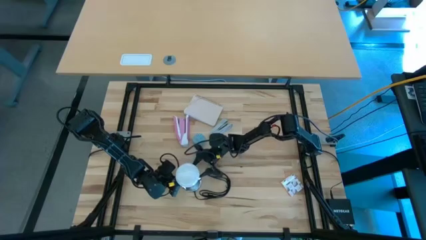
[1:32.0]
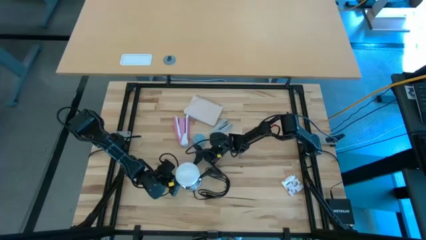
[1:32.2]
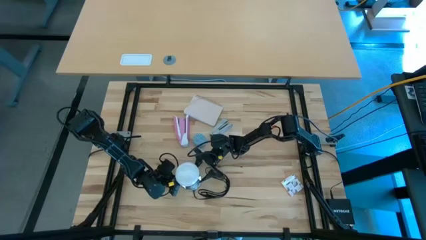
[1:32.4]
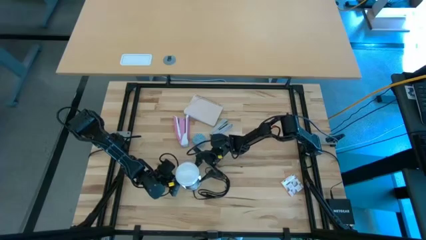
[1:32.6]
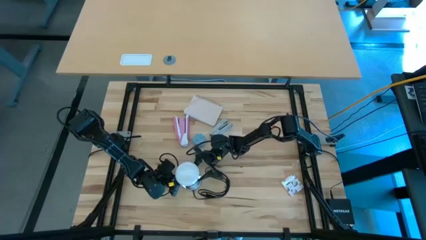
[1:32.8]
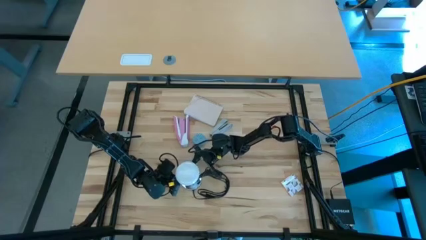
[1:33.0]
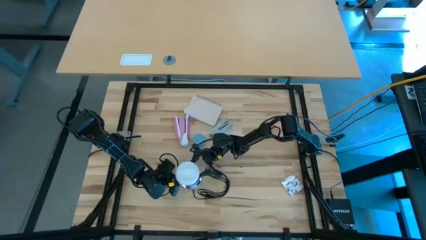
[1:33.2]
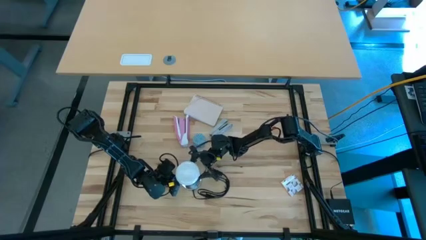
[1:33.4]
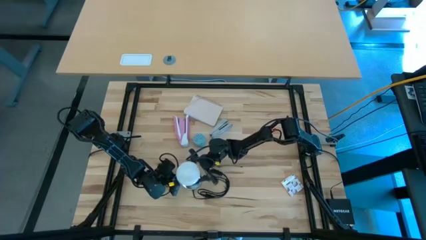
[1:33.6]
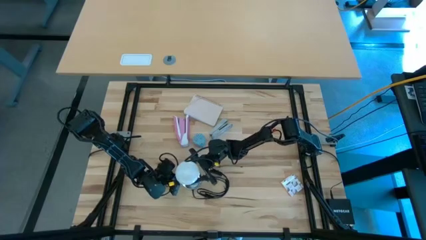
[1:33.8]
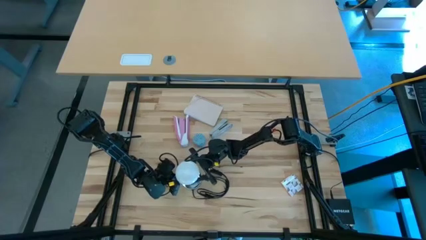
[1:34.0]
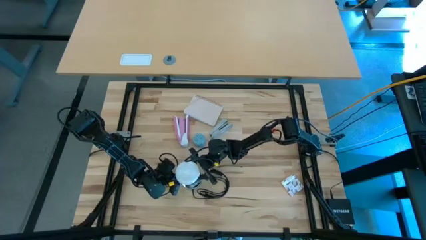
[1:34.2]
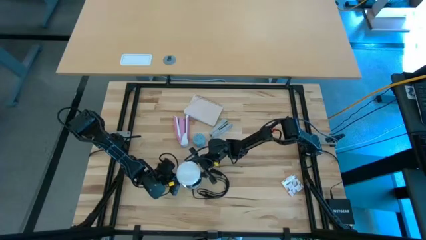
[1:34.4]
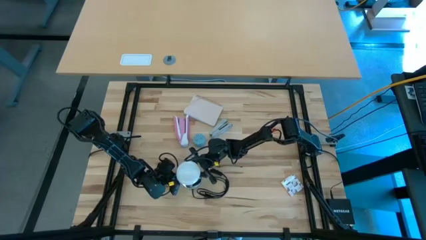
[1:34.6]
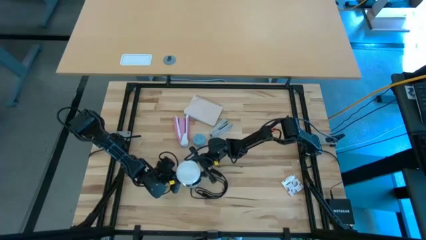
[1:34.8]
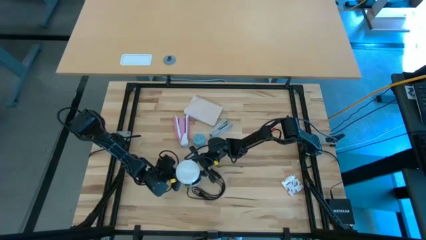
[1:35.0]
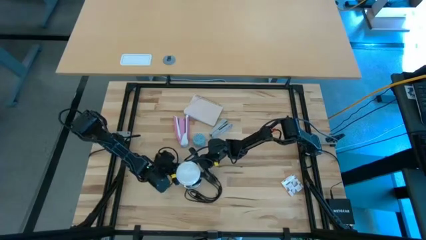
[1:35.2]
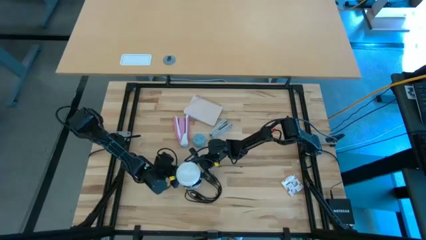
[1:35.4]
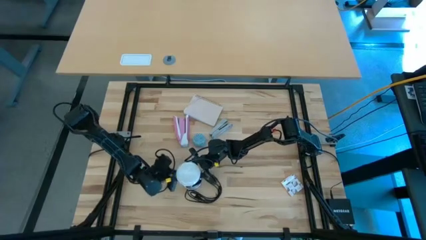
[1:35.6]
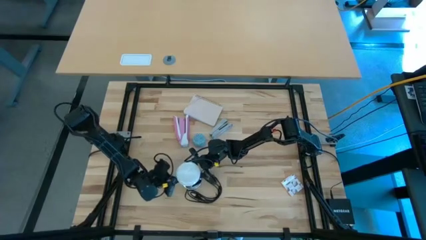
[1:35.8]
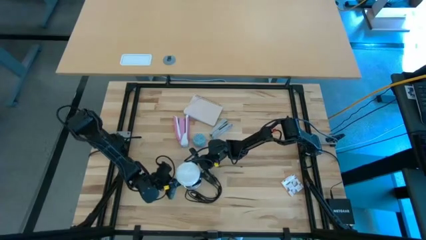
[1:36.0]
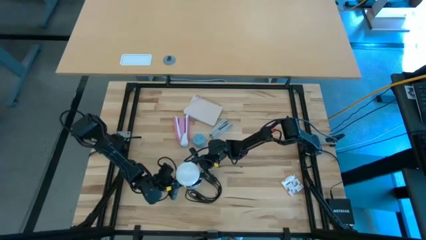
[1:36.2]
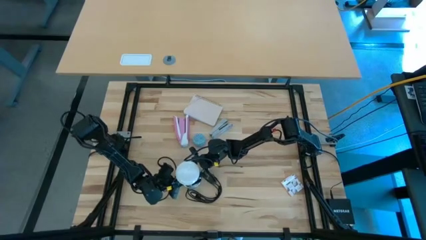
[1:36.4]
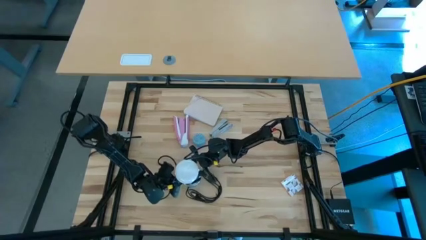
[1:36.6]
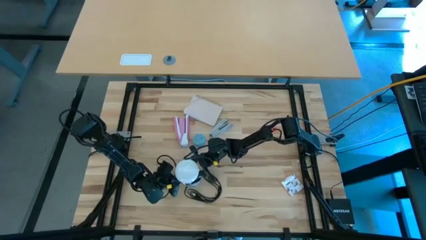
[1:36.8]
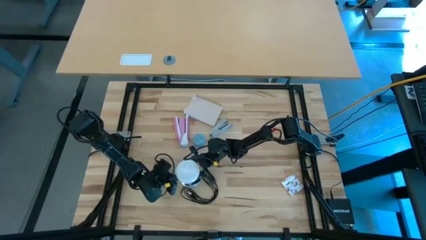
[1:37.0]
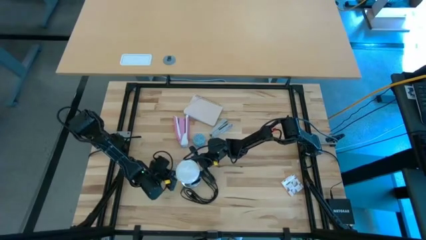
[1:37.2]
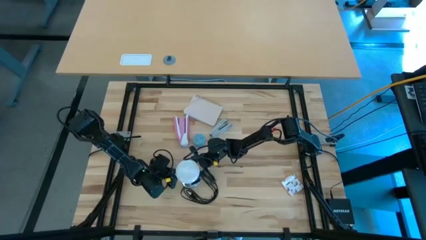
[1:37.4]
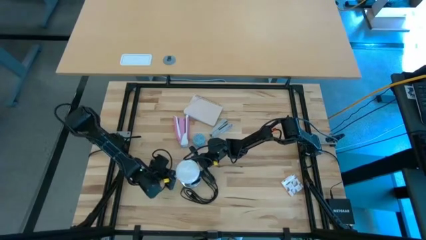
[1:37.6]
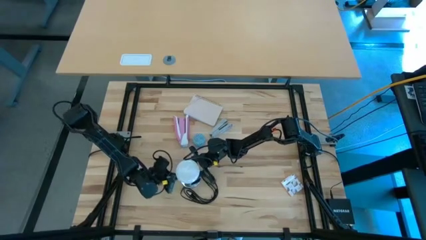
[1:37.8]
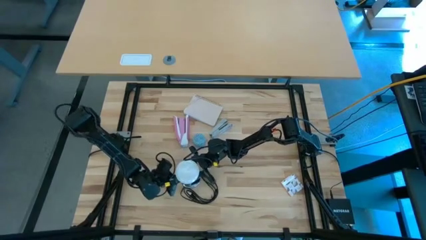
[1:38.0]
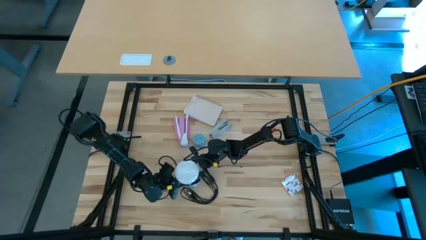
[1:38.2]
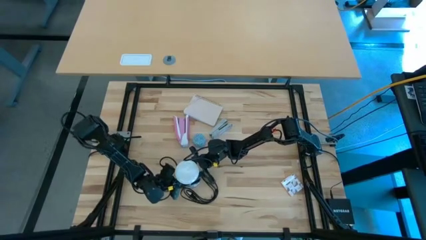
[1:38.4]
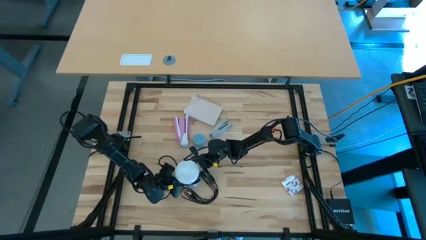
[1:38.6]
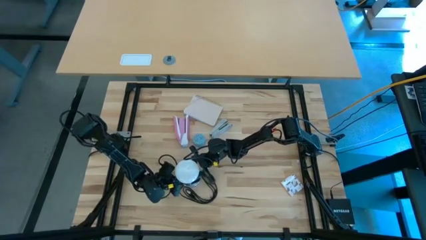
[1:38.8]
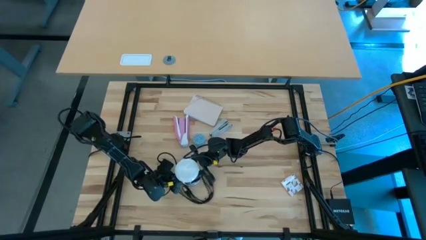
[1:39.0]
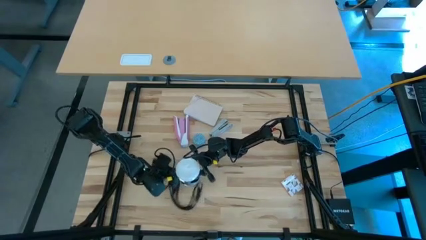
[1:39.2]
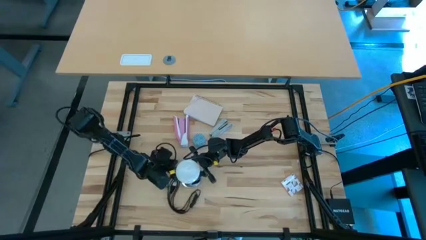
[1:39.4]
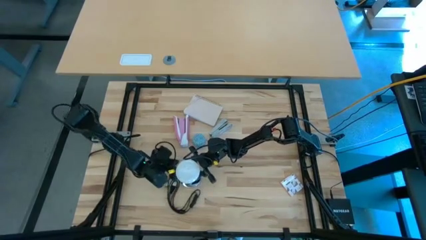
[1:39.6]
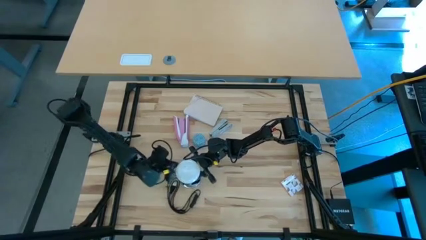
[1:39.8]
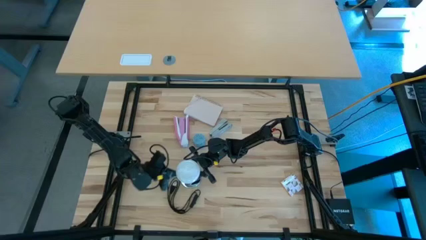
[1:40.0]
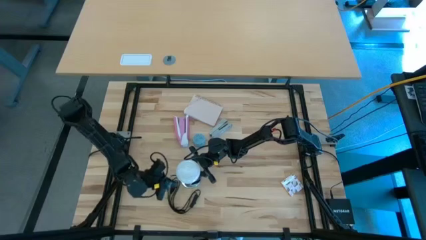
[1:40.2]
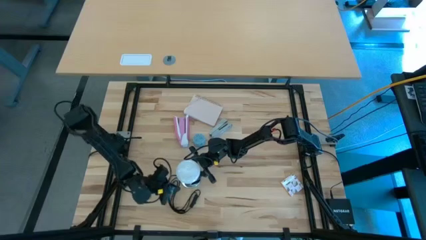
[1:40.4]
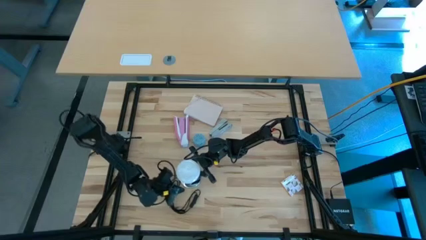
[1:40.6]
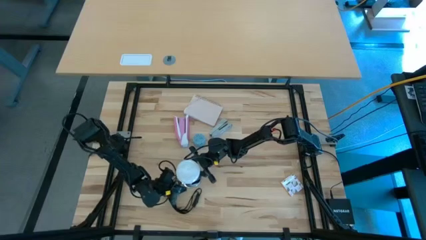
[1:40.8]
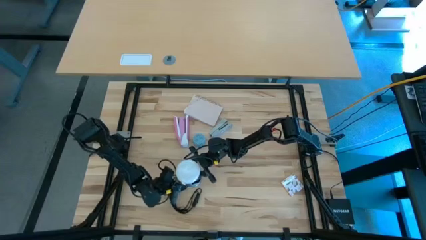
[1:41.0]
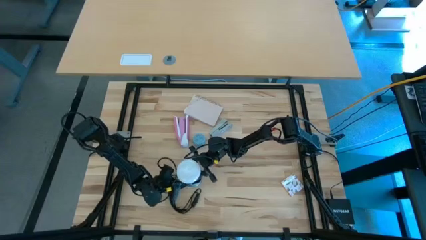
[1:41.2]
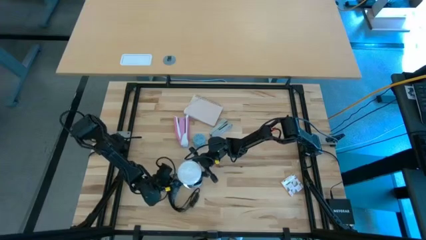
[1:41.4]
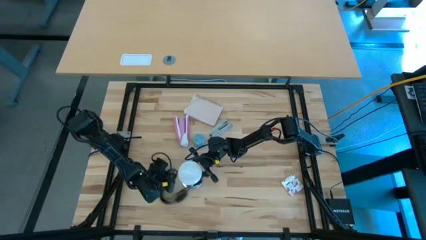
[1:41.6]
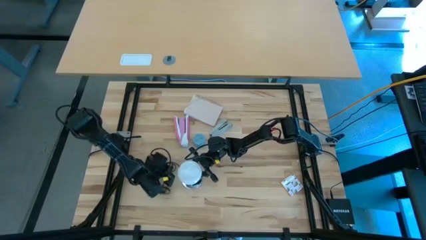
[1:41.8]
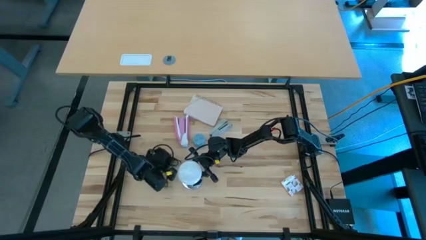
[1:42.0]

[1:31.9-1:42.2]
Task: Screw lightbulb
Remove the lightbulb from the lamp

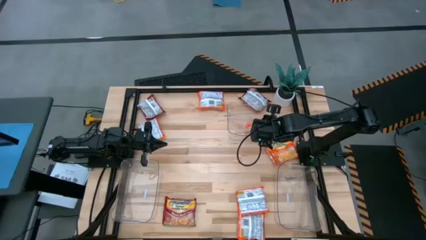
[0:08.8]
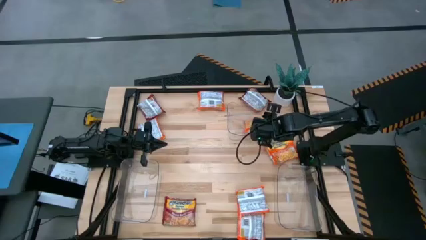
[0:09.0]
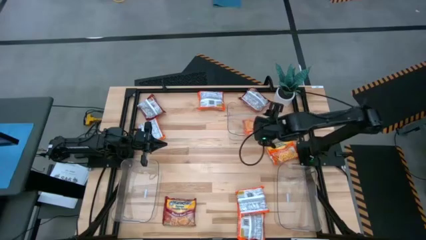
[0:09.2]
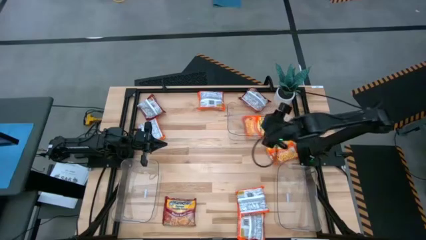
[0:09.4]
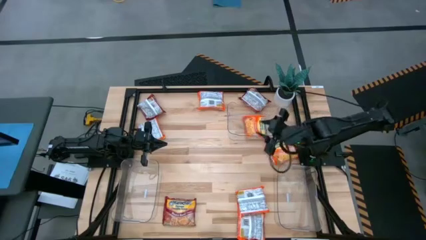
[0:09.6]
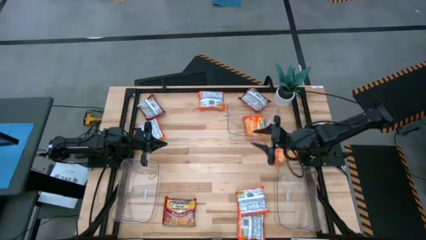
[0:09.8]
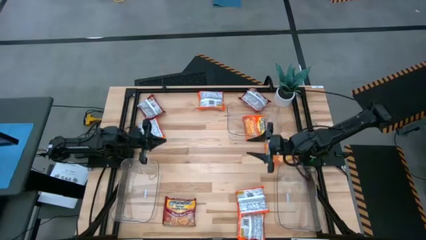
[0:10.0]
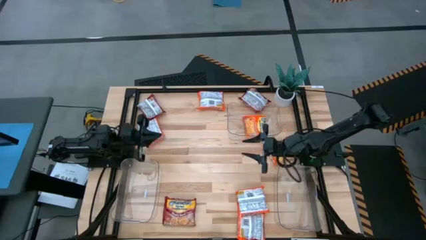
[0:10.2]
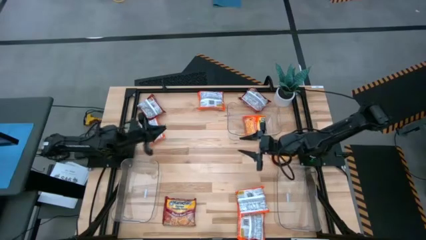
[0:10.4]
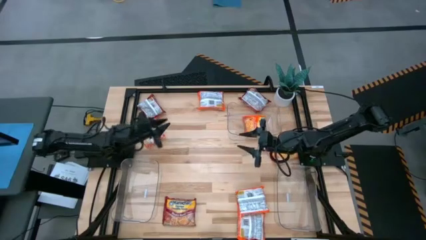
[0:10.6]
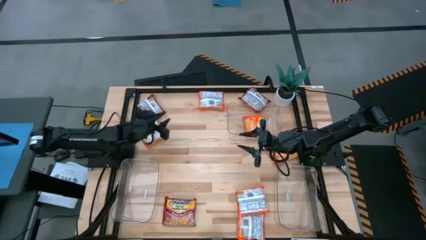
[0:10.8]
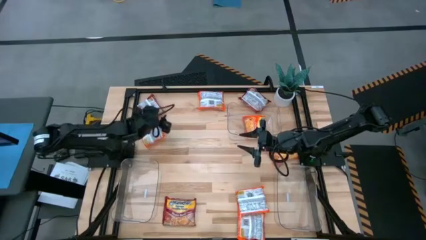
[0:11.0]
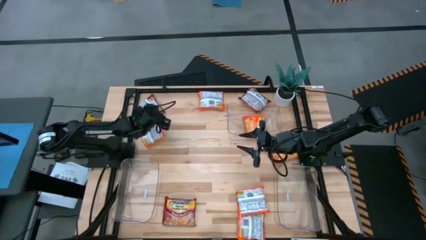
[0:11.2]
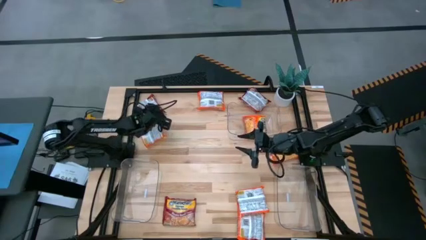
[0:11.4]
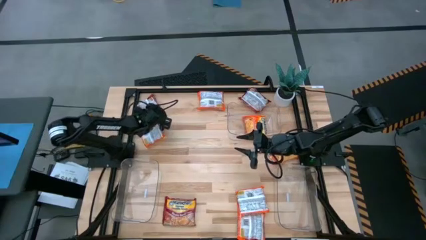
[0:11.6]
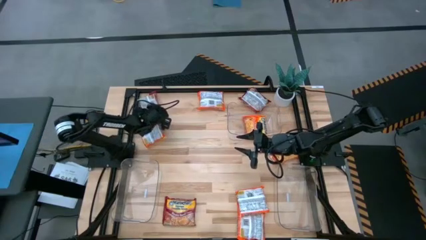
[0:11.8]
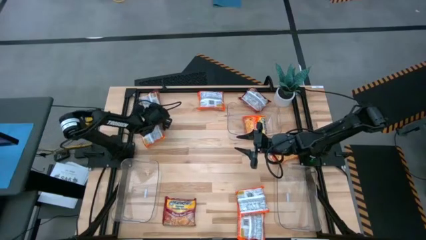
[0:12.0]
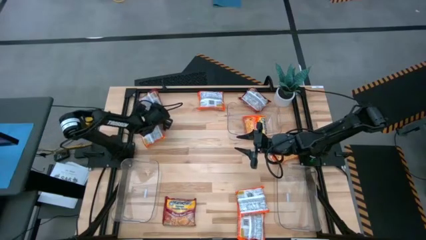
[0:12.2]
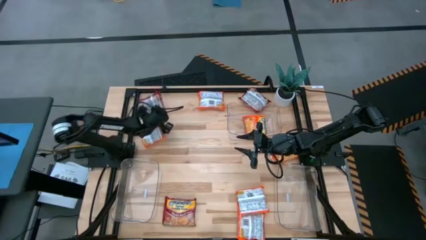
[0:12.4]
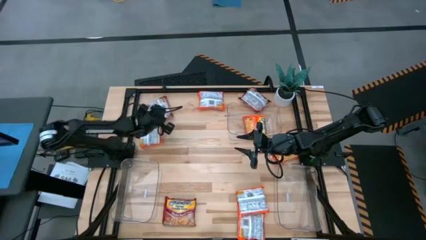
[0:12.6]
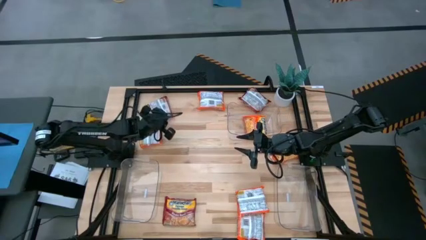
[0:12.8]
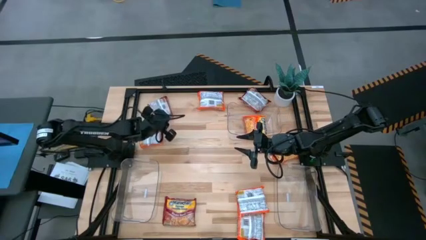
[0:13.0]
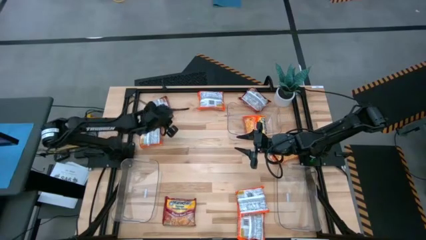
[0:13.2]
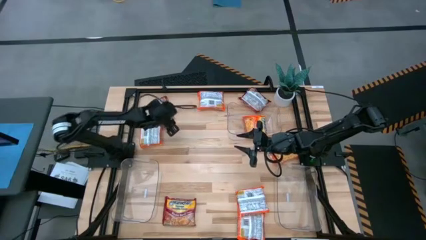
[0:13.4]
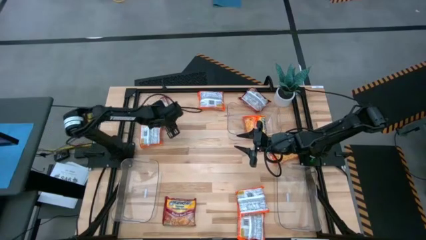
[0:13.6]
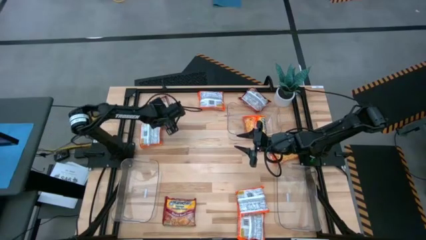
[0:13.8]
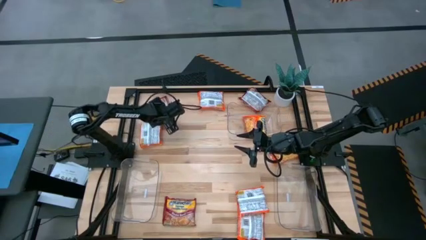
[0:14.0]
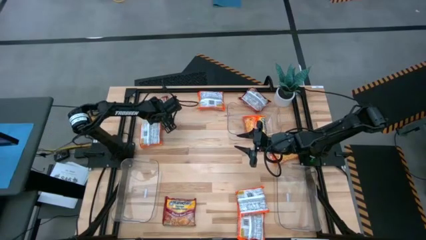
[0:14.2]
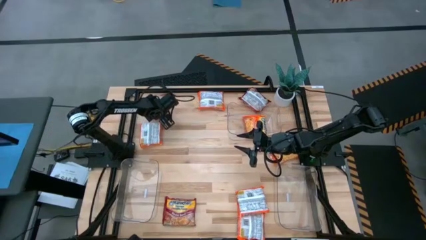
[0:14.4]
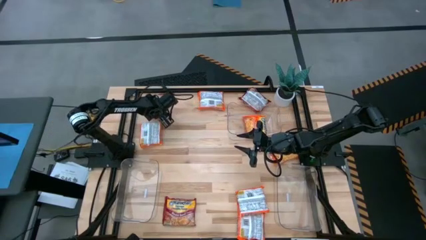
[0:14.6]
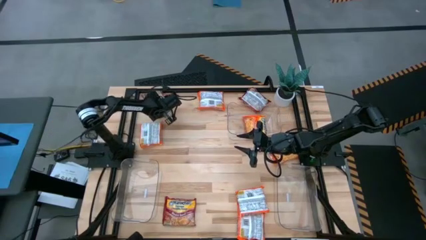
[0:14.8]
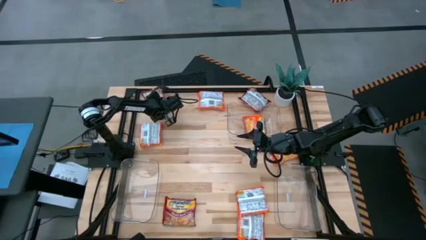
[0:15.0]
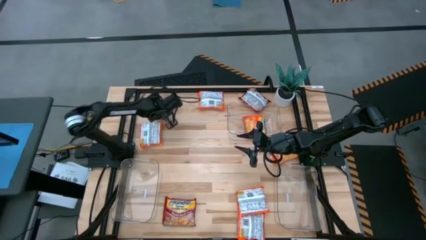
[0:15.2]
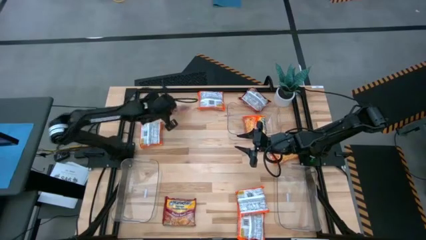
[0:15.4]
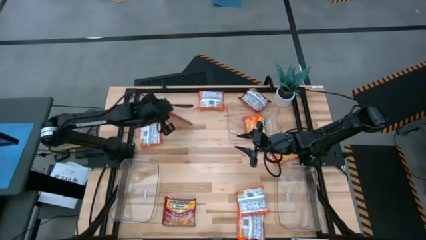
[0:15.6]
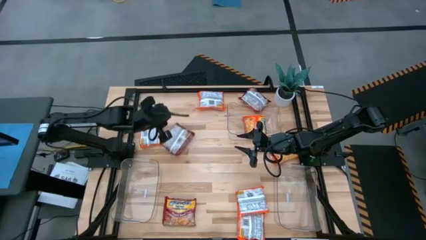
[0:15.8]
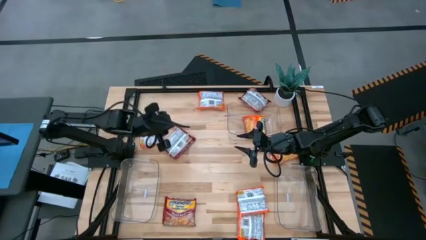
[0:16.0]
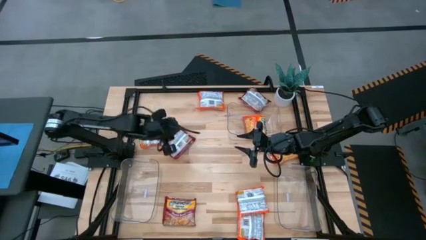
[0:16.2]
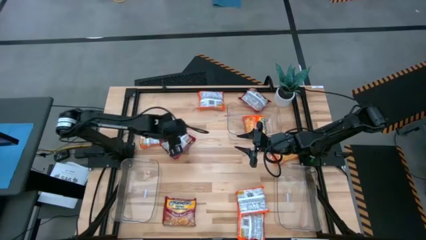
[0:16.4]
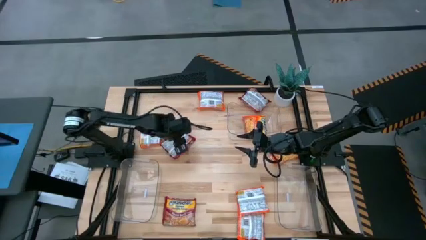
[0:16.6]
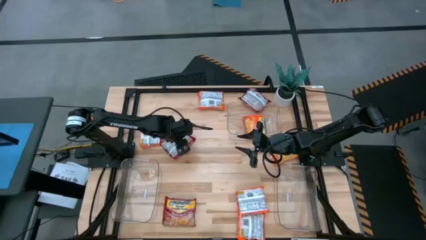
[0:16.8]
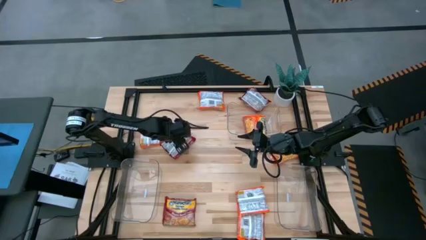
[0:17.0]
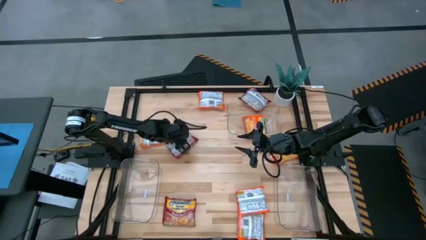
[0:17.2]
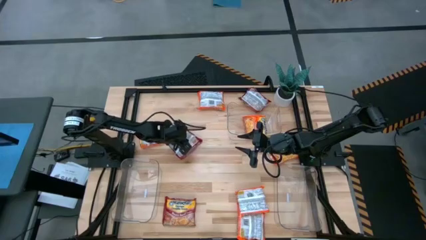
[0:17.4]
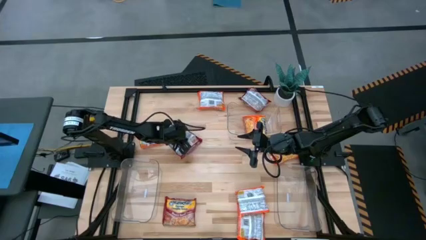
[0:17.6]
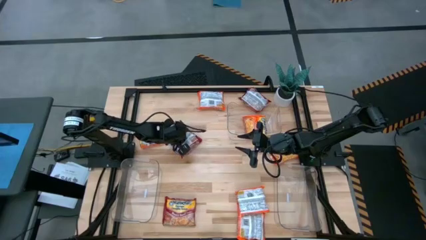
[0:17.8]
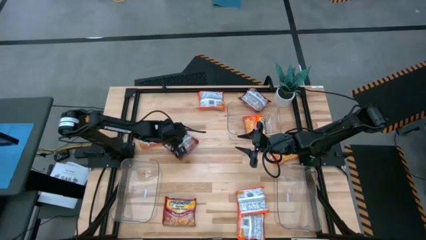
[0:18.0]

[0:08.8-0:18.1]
Task: Sort Maruchan noodles
Put the red noodle pack into the bottom left transparent bin
